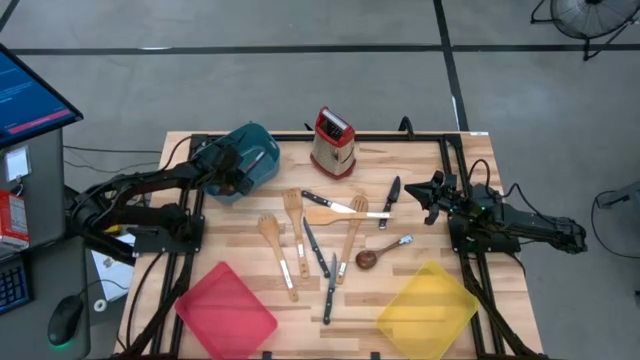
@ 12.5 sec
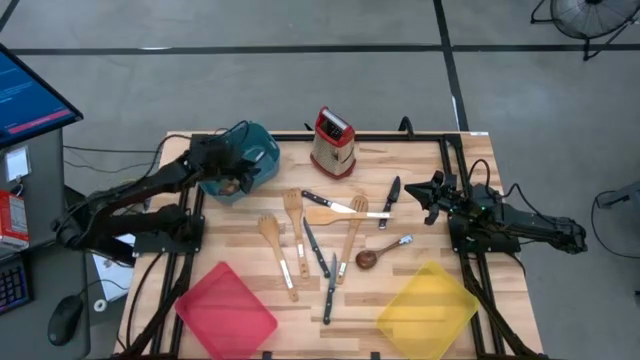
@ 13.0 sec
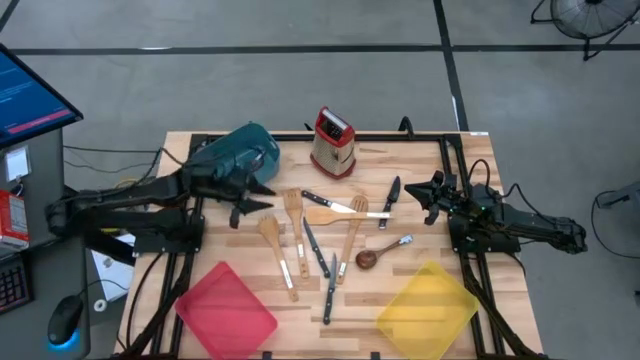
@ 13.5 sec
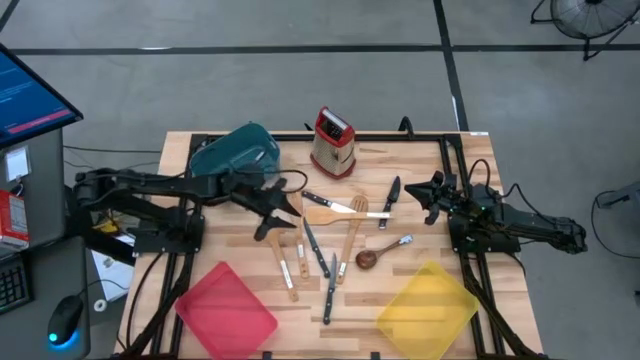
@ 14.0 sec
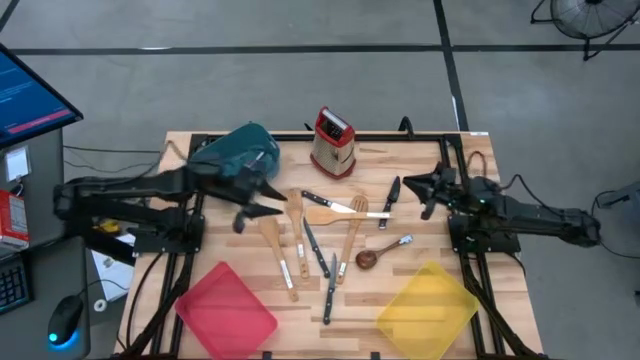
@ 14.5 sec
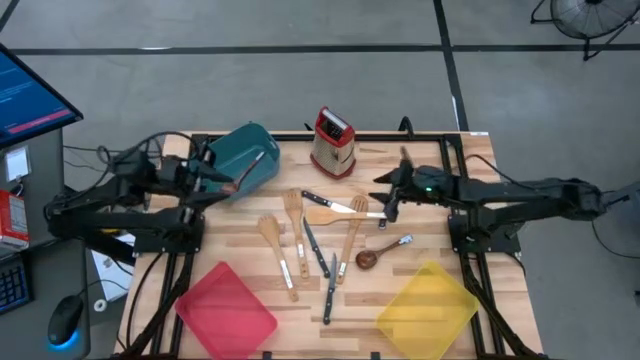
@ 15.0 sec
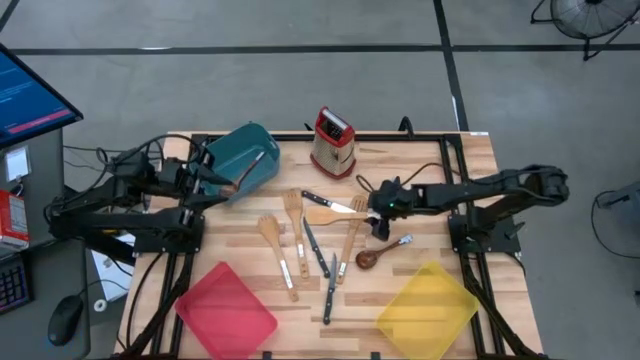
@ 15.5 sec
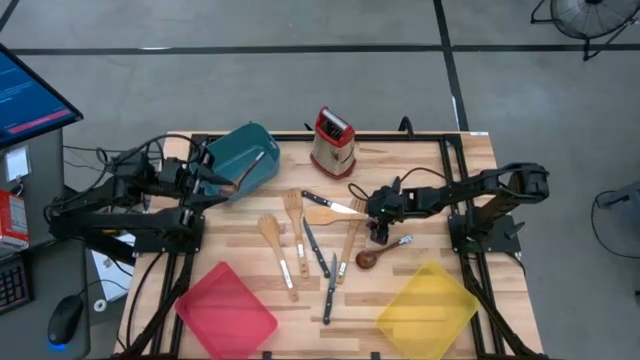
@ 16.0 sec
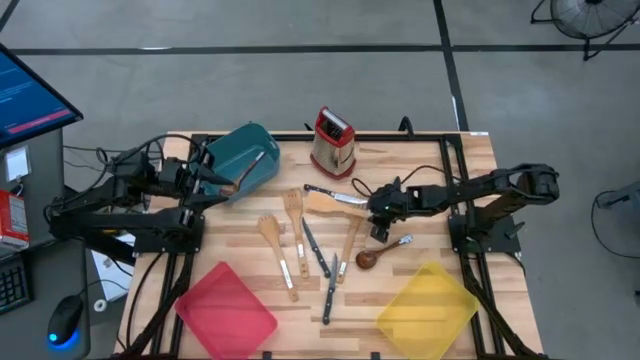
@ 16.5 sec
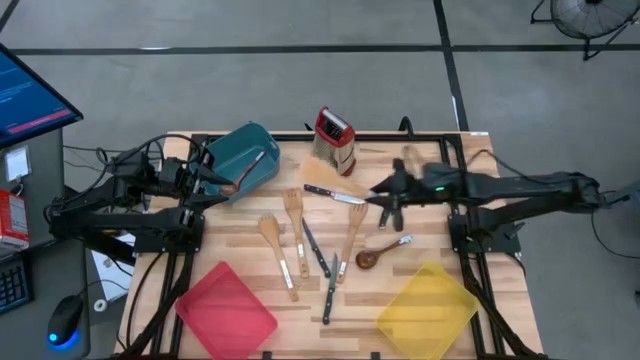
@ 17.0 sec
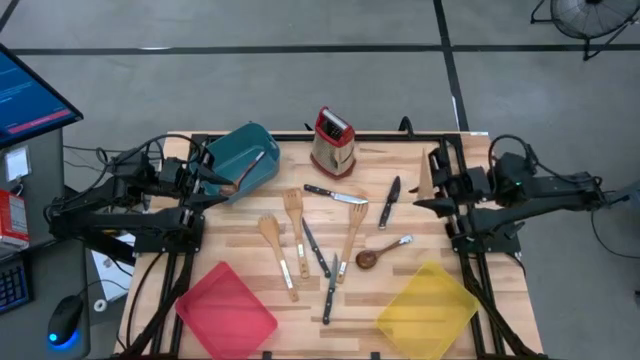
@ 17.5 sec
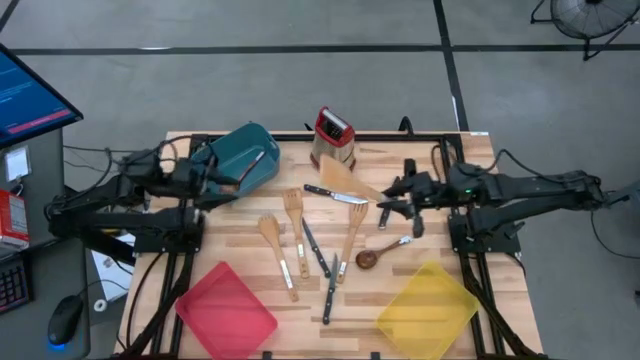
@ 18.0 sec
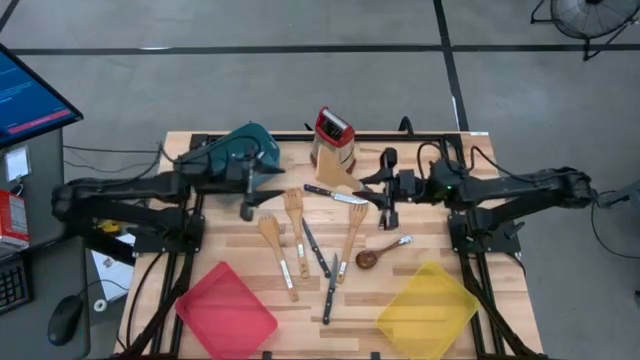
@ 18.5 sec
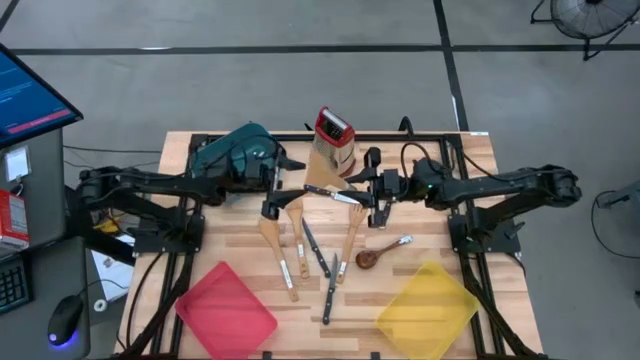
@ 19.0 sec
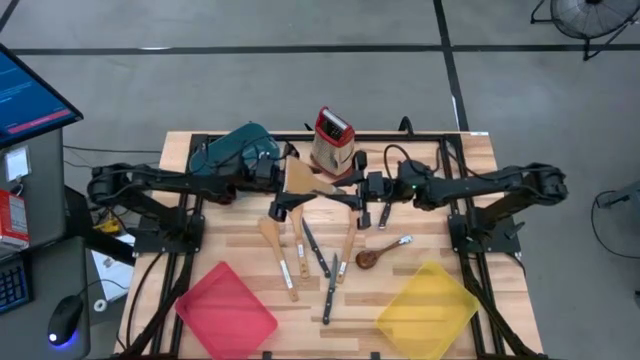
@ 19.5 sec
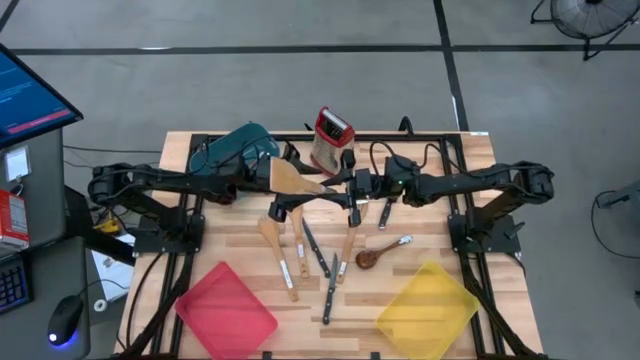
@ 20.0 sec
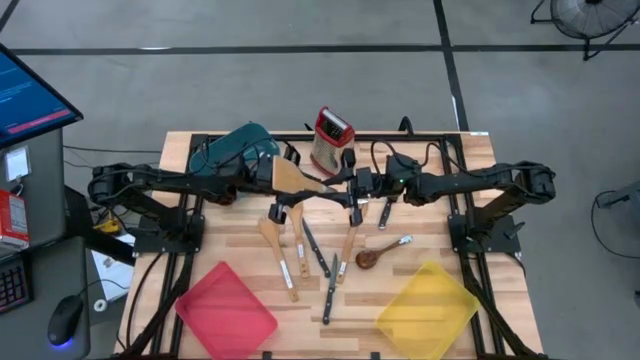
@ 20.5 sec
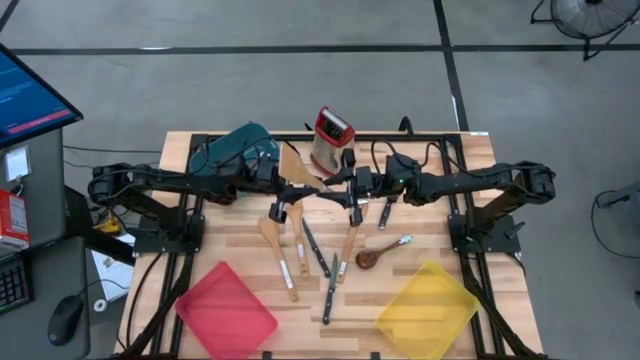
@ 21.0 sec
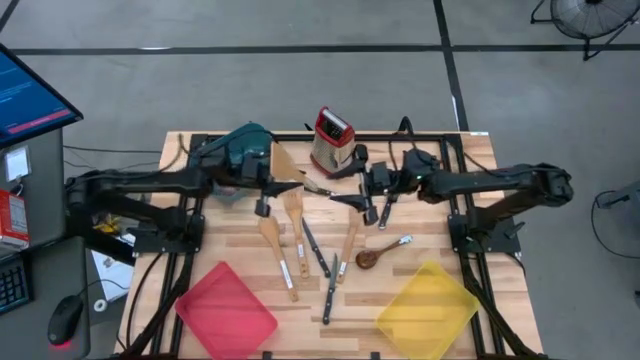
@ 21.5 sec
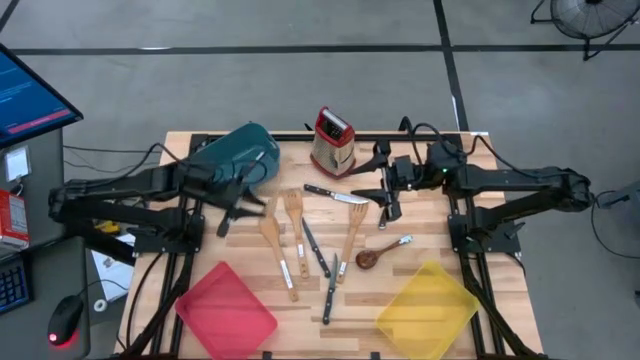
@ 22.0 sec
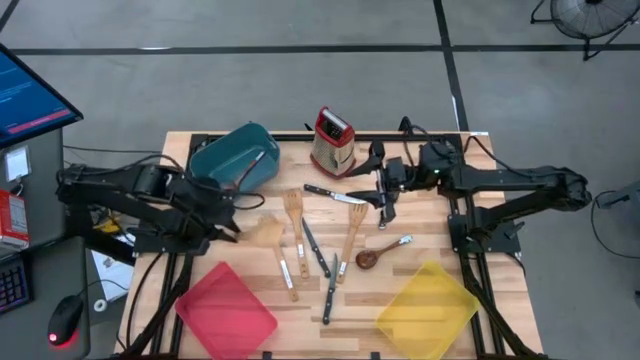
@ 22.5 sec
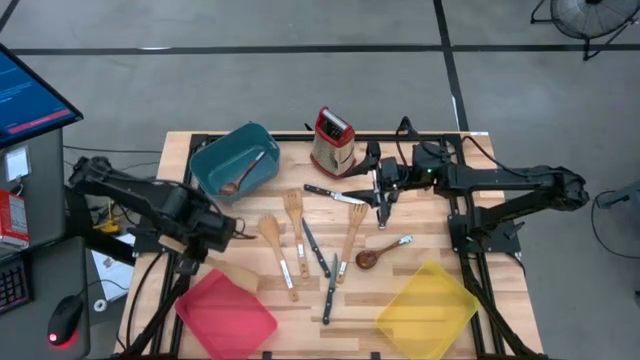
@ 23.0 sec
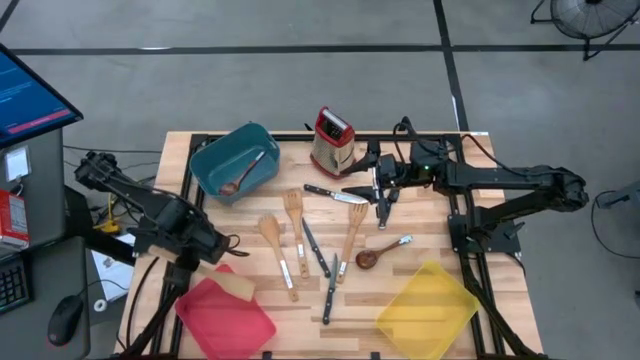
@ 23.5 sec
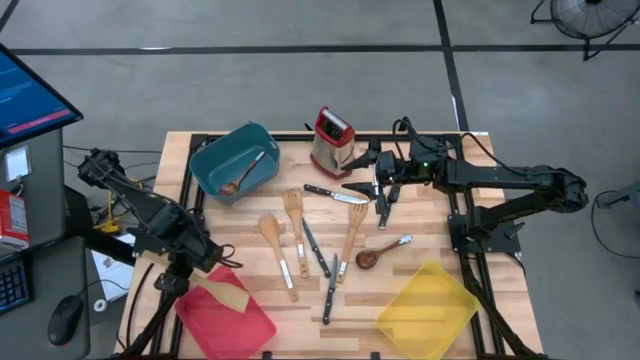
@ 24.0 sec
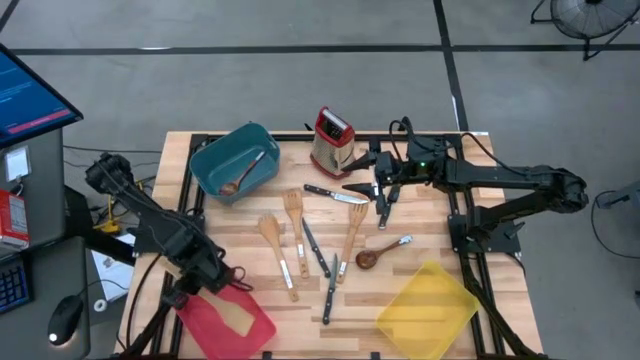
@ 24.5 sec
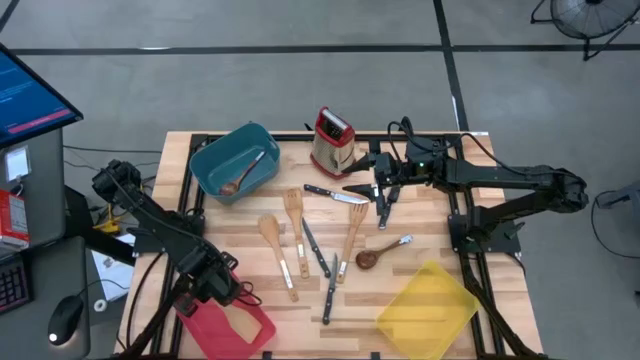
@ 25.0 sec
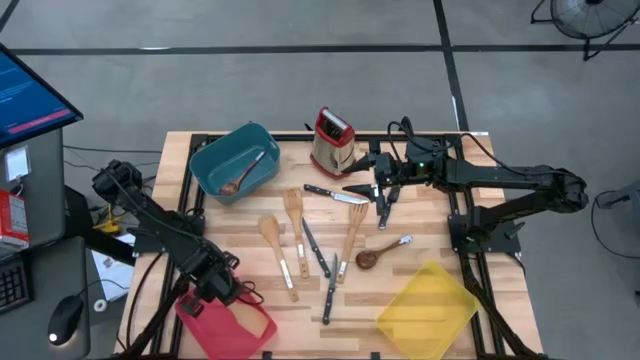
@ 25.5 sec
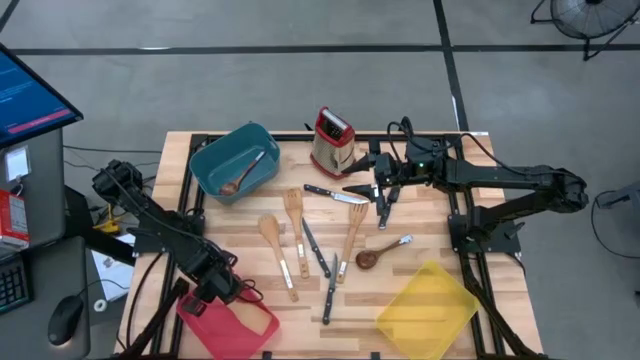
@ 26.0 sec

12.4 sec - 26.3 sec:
Task: Pick & Place Kitchen Items
Put the brown wooden spatula into the pink bin

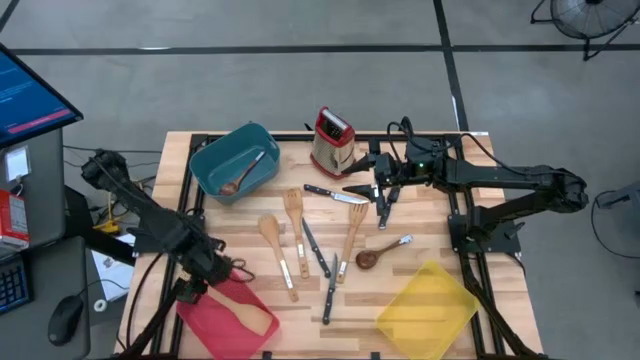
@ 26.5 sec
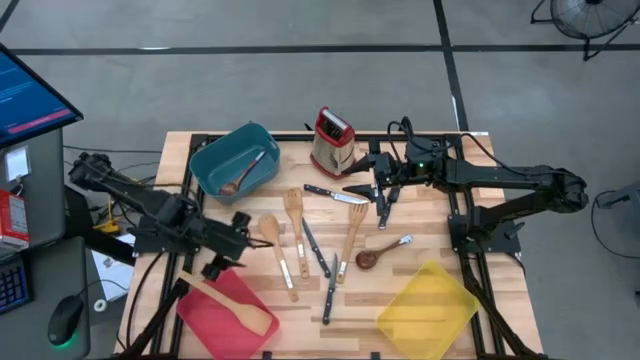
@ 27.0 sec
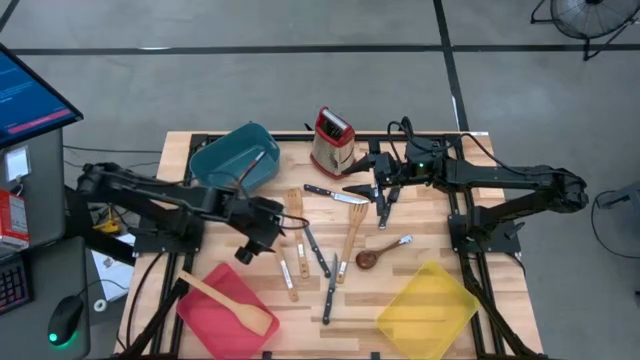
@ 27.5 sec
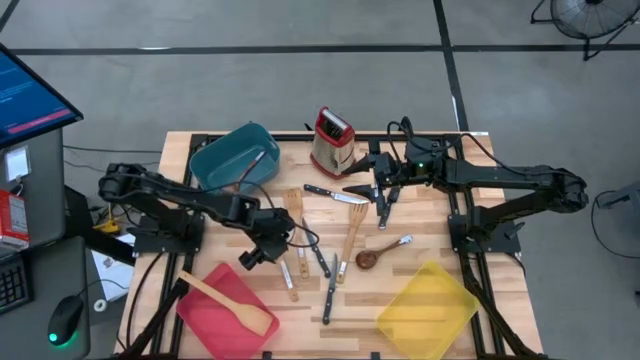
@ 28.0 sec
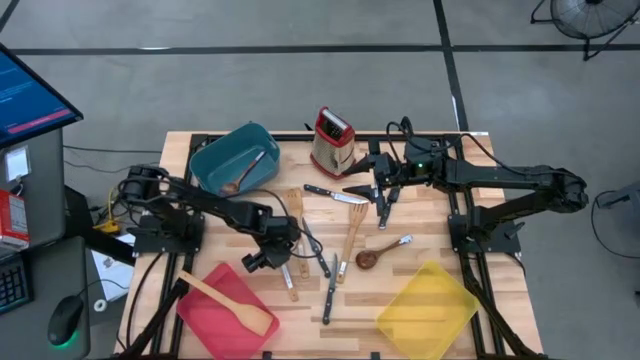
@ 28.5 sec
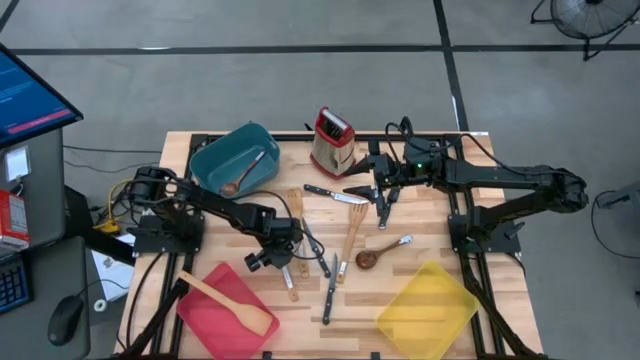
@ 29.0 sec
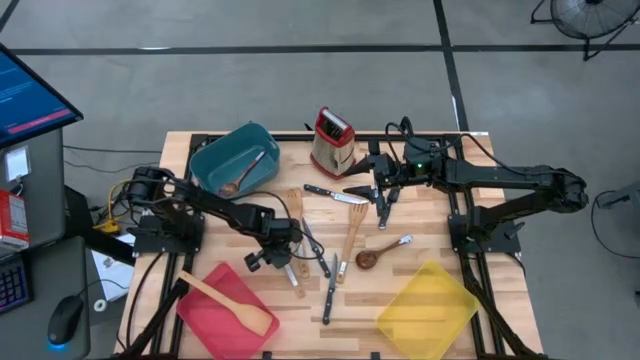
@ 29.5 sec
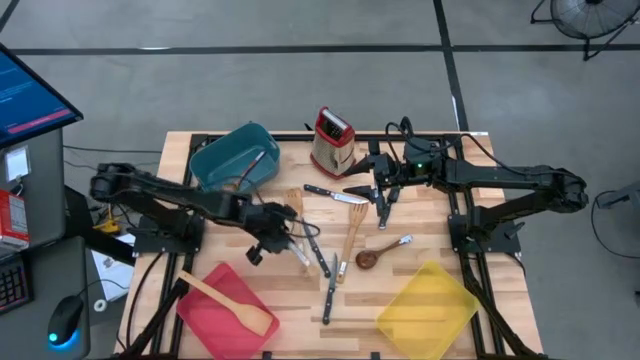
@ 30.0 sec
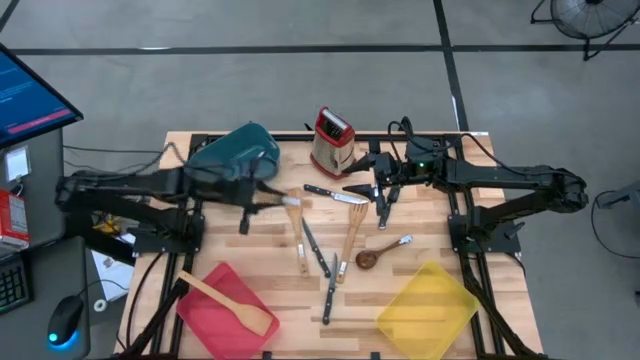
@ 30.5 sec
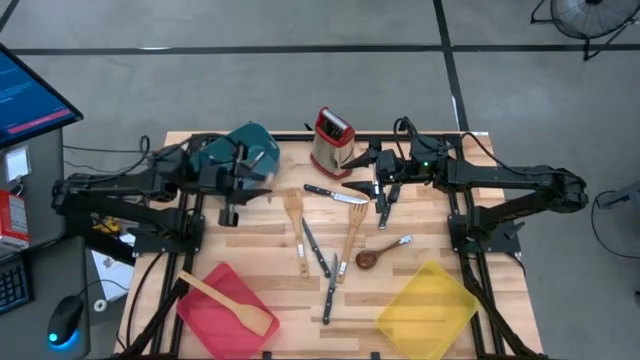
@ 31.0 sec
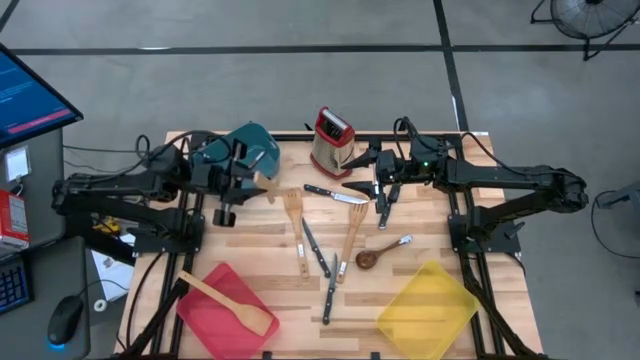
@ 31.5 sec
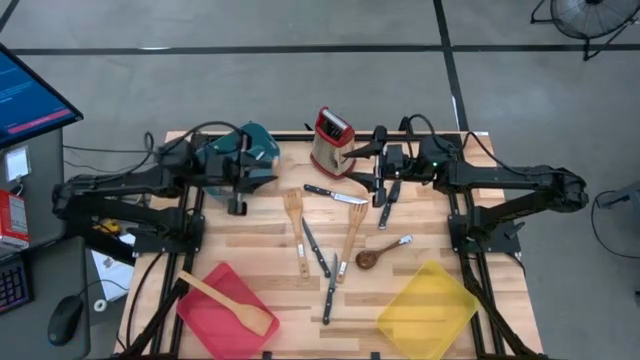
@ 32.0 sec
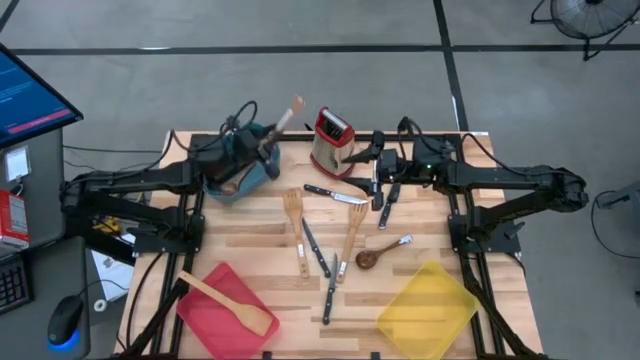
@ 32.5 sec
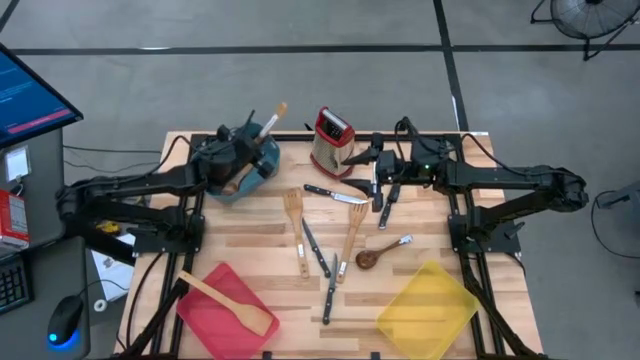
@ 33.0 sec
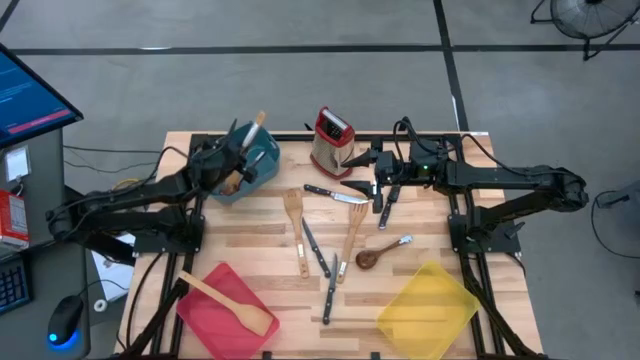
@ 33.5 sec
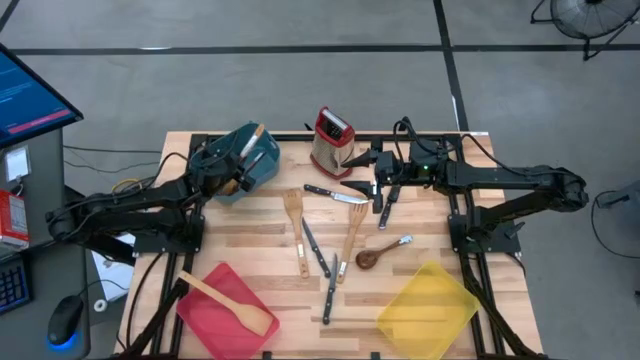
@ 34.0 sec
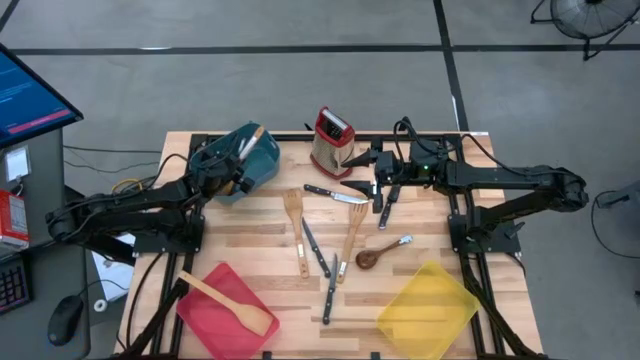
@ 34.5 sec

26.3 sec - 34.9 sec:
Put the brown wooden serving spoon into the blue bin
